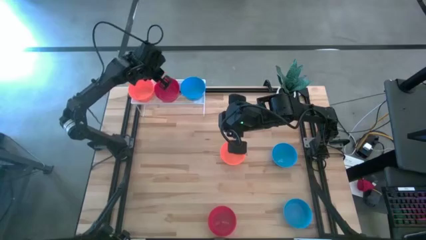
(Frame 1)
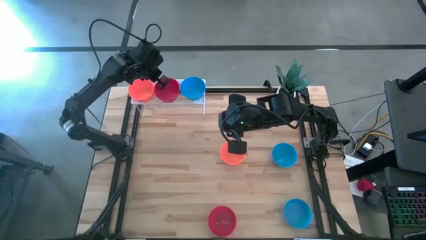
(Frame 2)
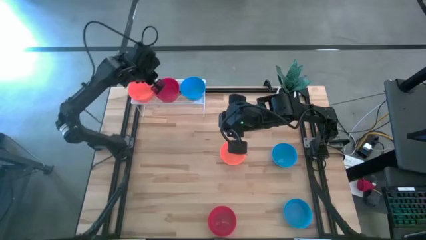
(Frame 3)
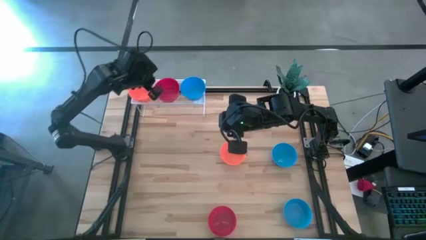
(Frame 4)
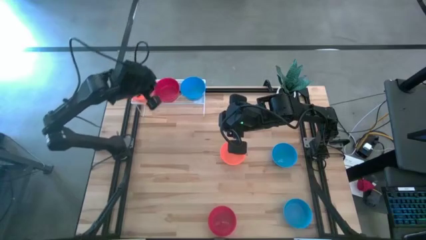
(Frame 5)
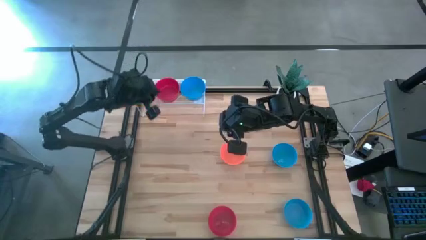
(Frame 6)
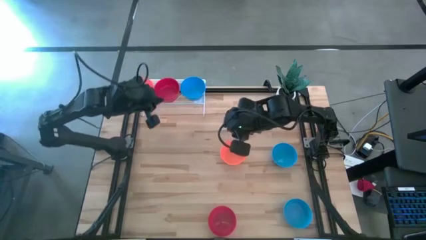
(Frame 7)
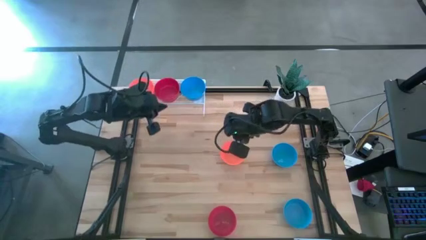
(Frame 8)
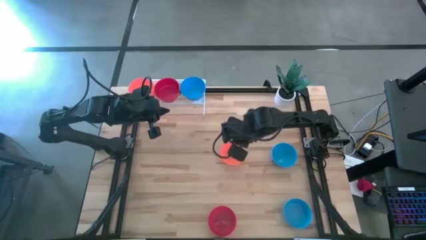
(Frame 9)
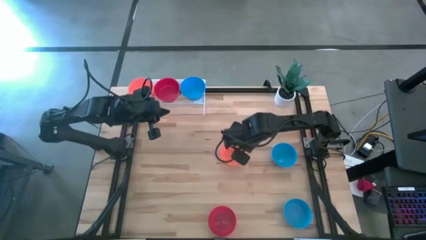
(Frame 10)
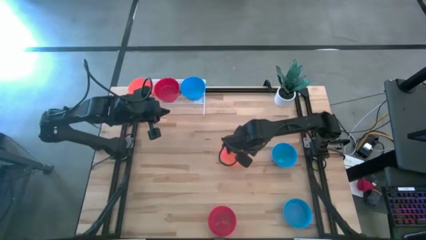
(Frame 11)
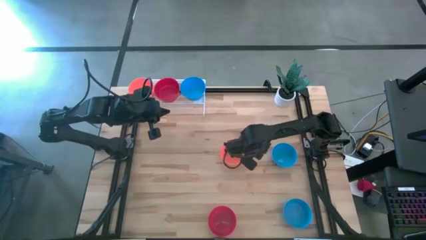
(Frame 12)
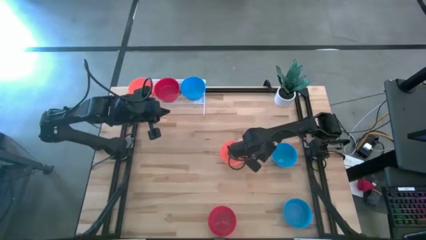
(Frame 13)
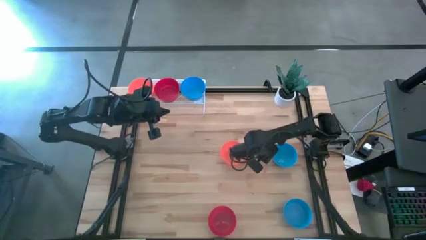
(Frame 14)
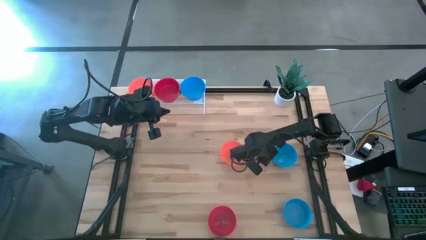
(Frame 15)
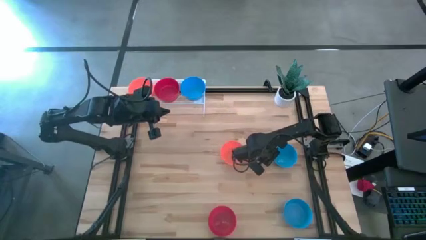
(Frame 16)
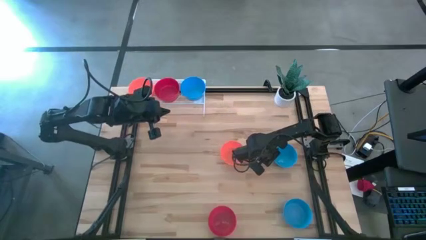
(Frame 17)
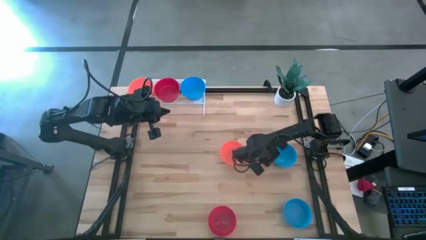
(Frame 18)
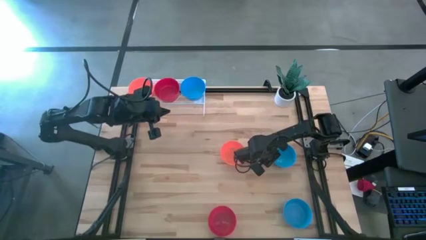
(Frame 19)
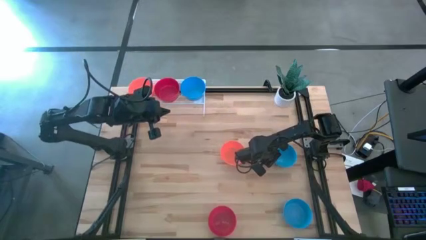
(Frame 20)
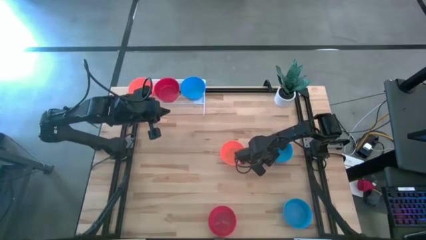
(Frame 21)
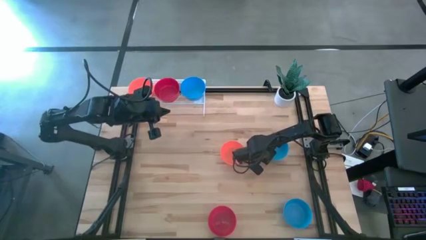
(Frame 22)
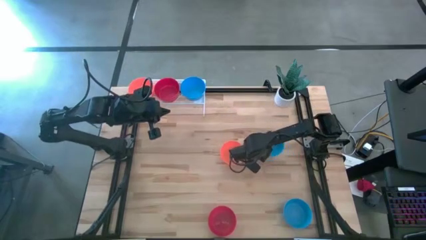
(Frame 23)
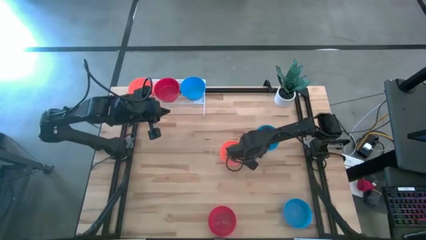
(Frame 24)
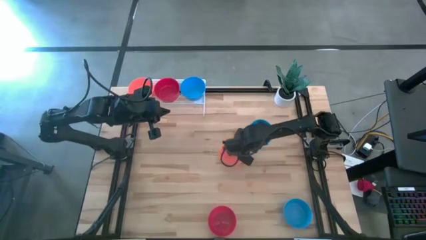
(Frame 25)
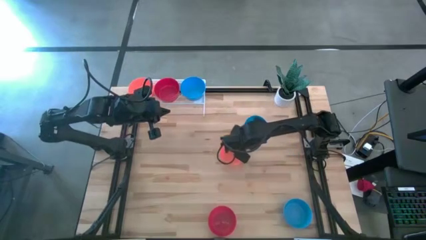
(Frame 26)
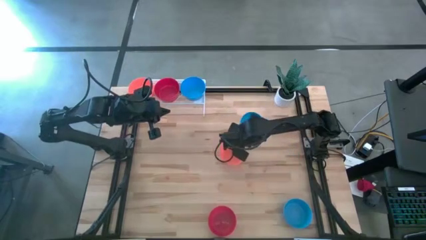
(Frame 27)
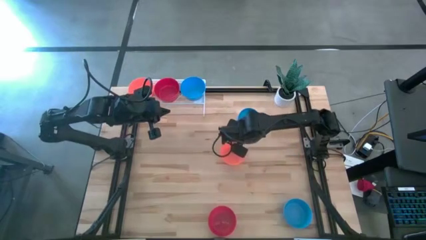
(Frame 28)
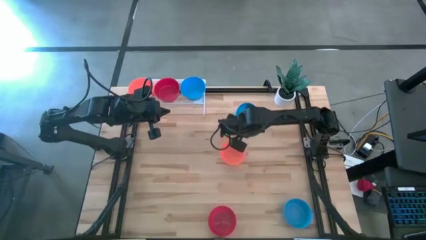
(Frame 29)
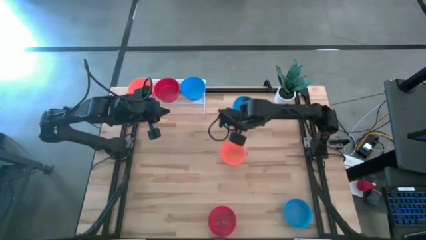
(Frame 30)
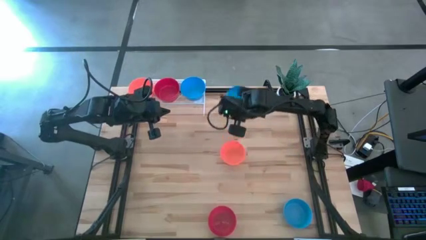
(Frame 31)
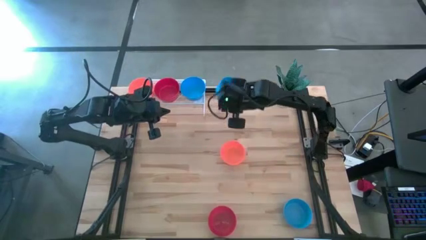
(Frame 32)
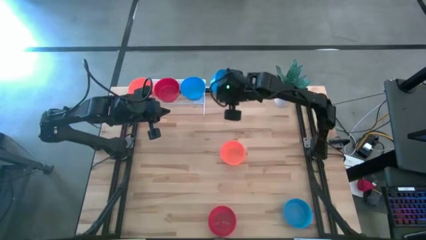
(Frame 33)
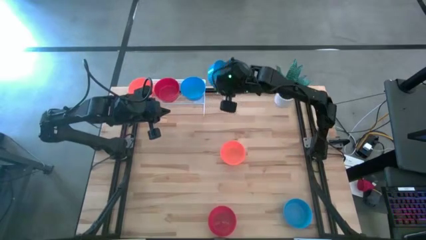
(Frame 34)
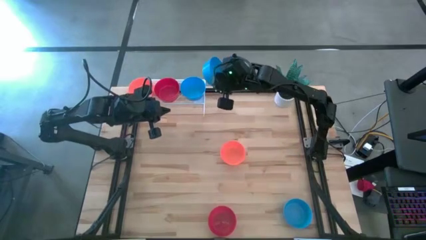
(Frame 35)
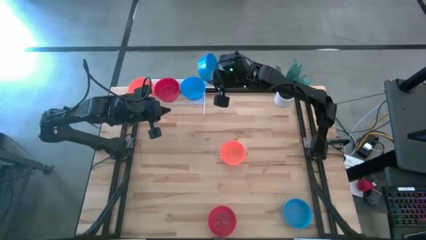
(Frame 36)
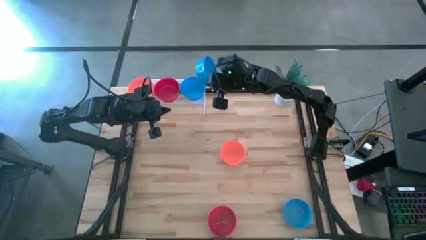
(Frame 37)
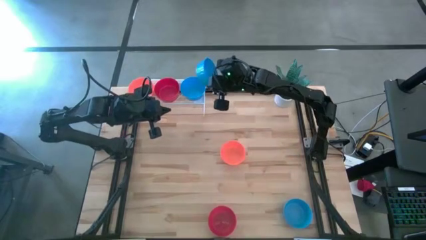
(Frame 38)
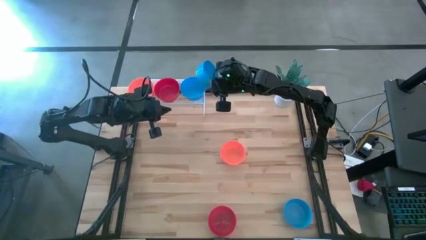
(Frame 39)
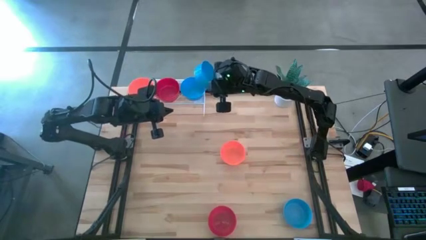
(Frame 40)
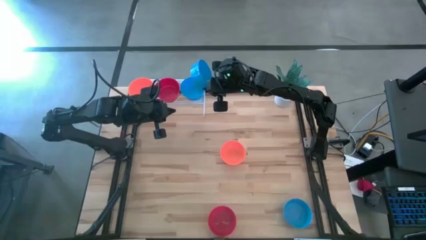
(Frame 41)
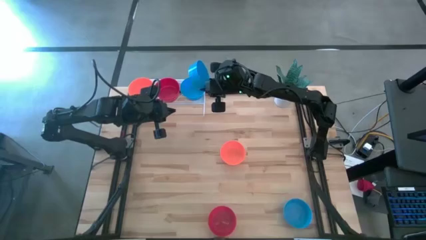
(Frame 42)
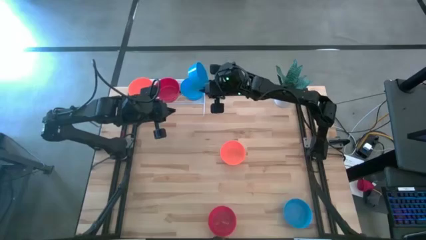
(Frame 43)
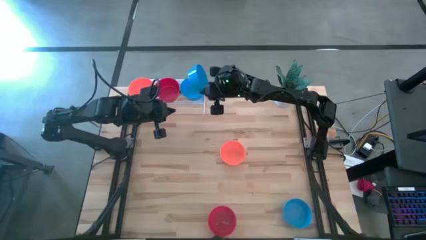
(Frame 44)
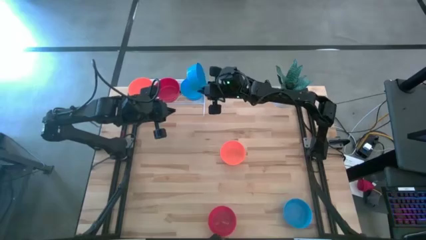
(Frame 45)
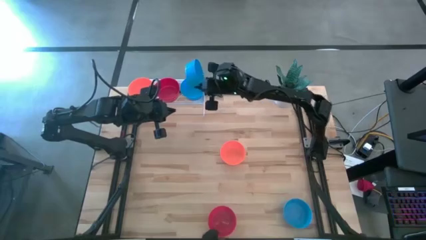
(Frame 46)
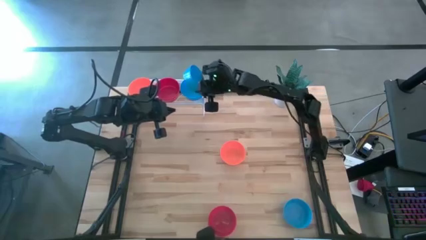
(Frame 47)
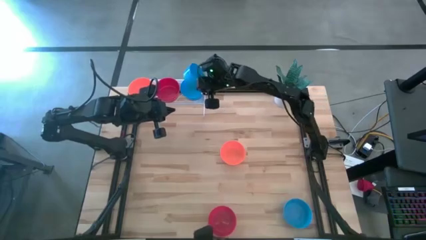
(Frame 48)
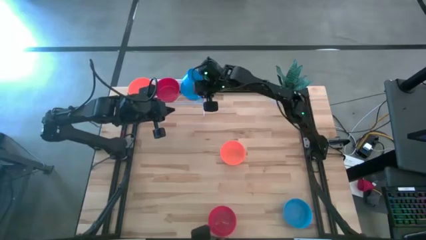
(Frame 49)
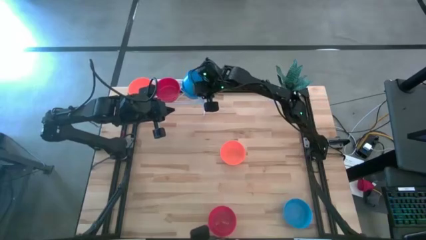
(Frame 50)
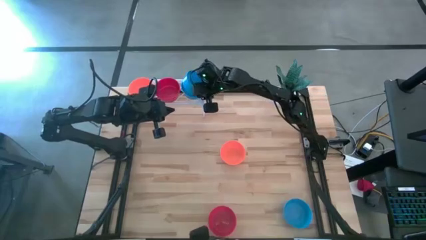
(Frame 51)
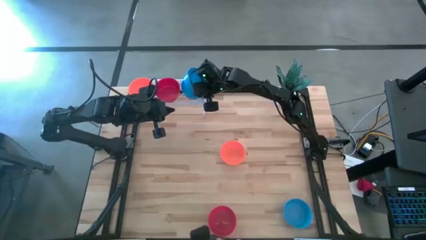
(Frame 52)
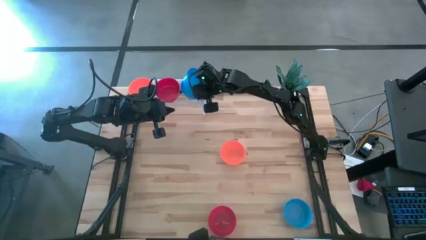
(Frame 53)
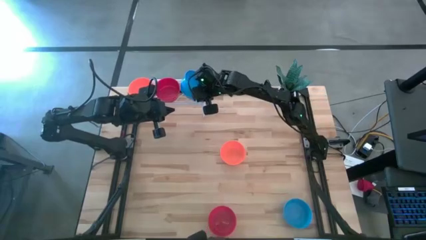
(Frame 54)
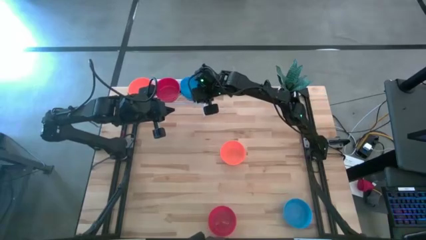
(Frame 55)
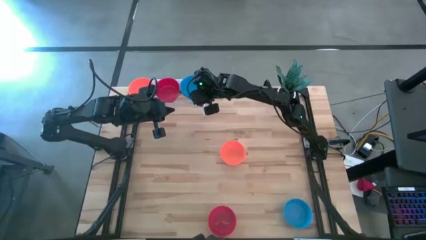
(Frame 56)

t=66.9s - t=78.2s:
Task: Pick & Place Mini bowls
Stack the top blue bowl on top of the blue bowl on the shelf

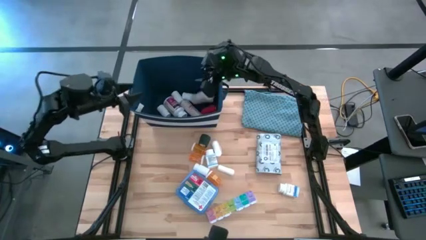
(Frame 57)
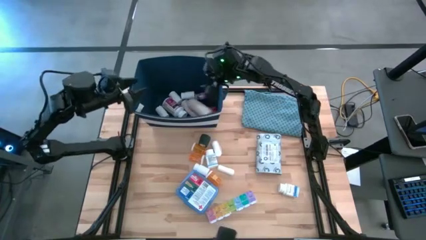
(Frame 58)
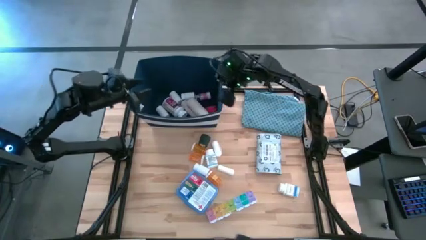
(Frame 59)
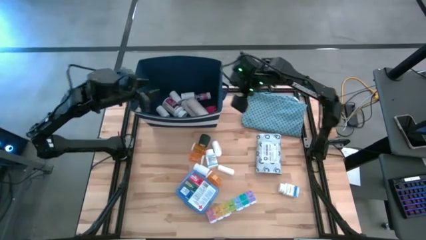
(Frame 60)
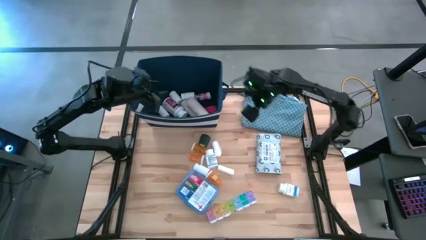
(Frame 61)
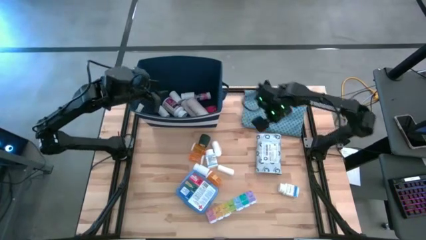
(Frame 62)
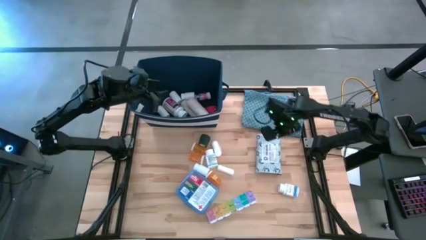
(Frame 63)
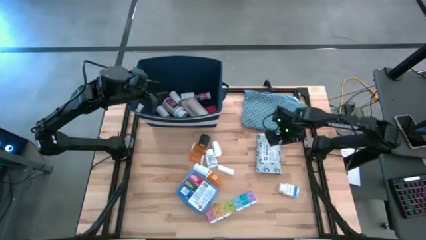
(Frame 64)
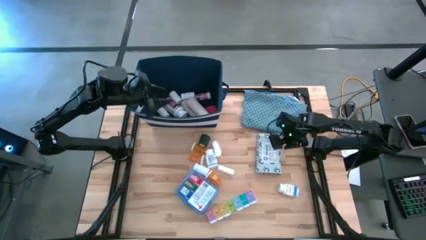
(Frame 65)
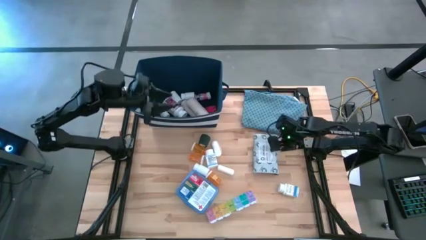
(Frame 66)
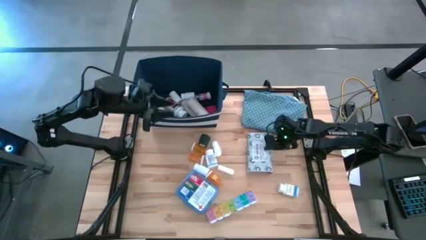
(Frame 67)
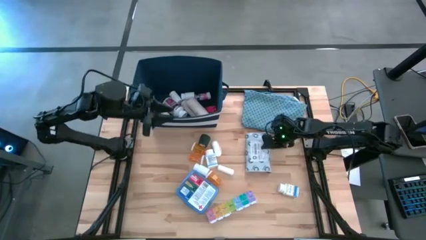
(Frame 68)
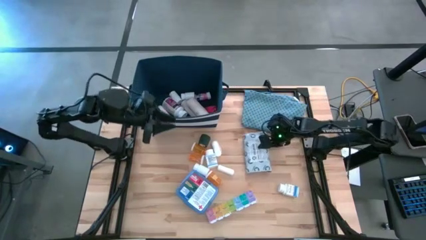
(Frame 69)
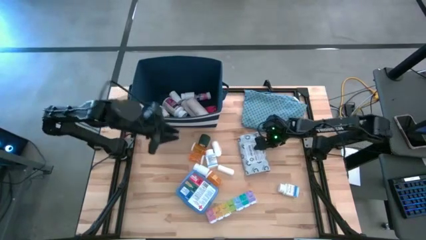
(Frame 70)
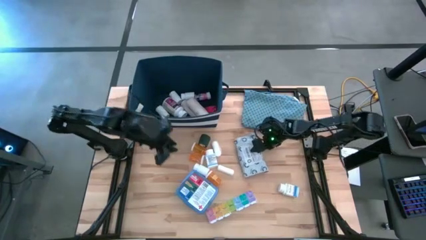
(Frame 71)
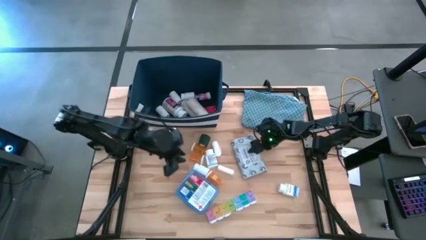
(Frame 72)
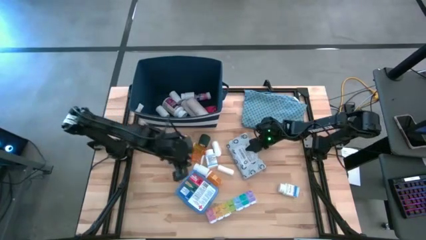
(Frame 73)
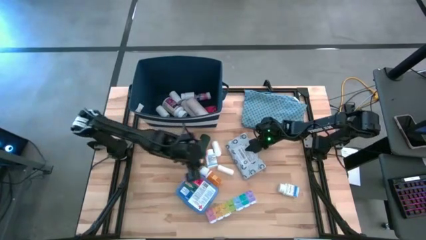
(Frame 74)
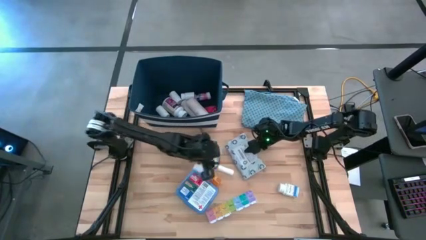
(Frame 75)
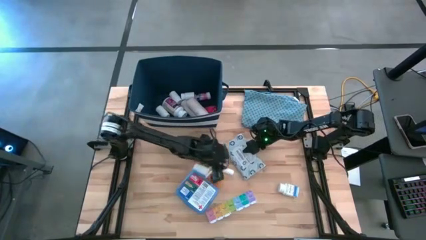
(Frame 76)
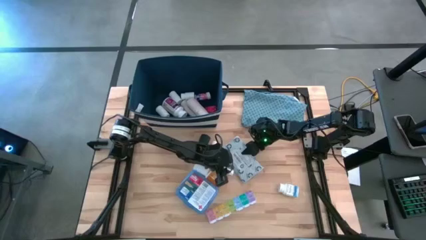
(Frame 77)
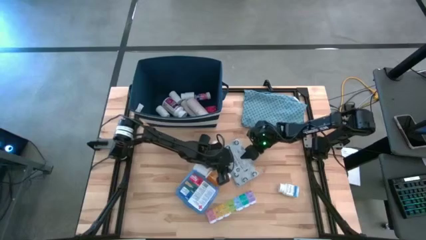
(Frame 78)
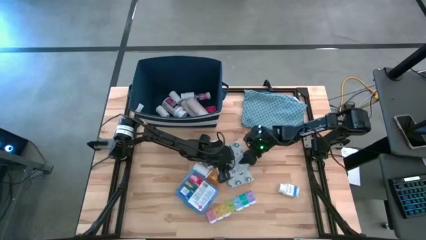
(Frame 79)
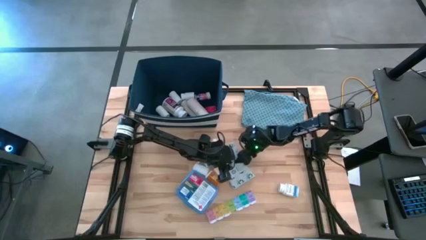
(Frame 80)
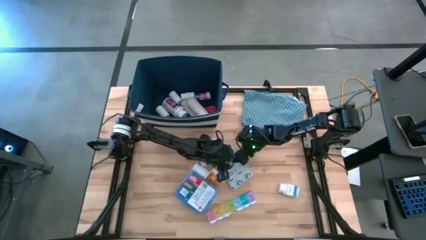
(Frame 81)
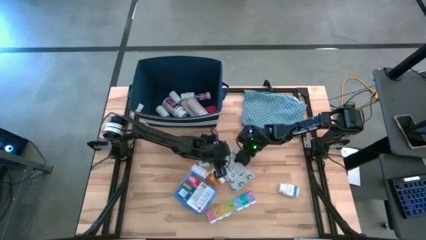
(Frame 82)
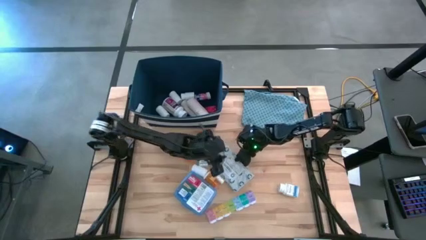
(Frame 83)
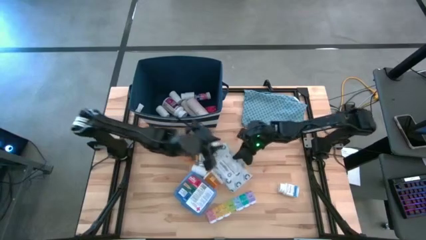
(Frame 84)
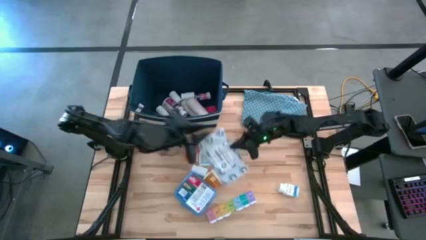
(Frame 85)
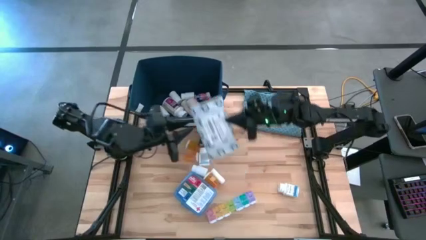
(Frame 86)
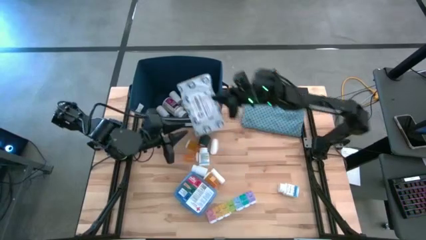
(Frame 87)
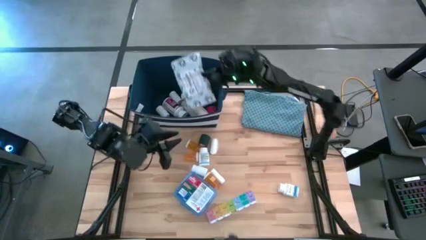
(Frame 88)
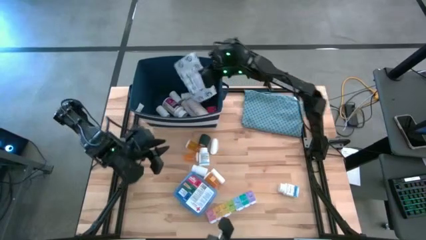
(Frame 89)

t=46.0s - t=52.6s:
Task: Pick & place medical supplies in basket/bin
Put the mailer bag into the blue bin
